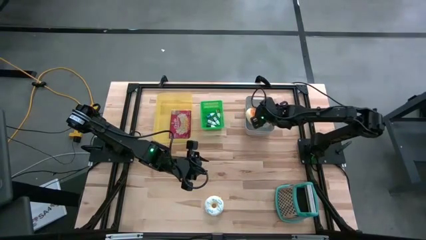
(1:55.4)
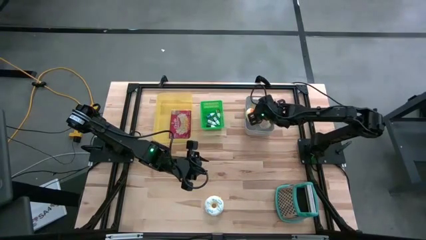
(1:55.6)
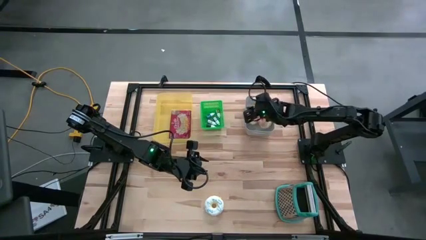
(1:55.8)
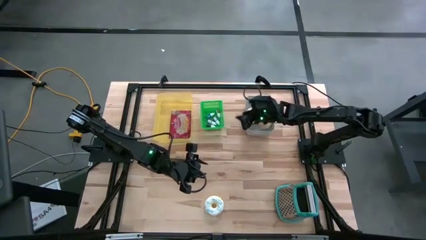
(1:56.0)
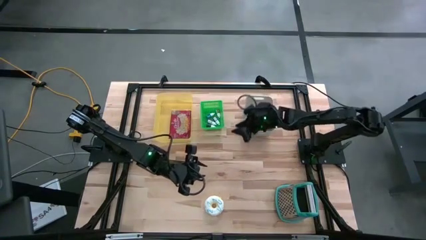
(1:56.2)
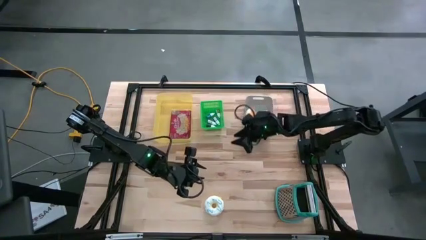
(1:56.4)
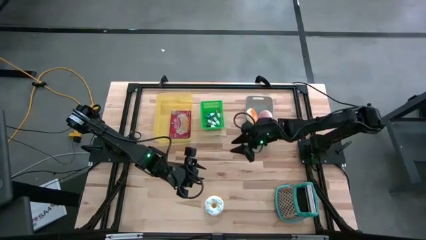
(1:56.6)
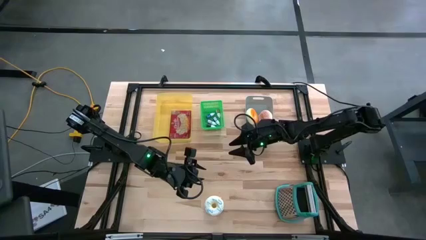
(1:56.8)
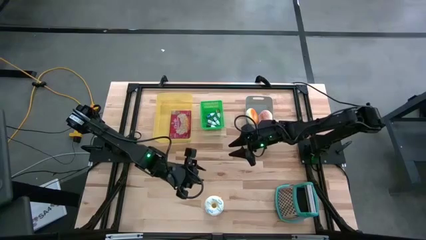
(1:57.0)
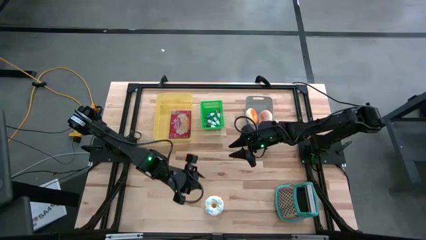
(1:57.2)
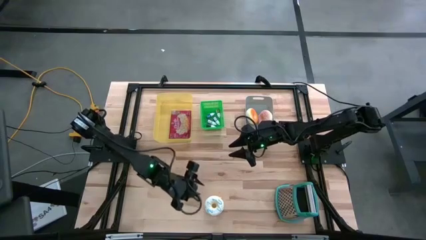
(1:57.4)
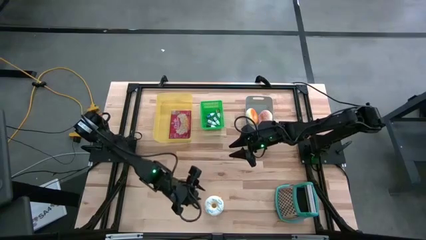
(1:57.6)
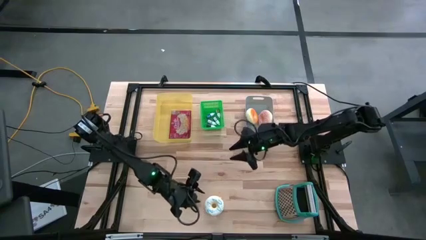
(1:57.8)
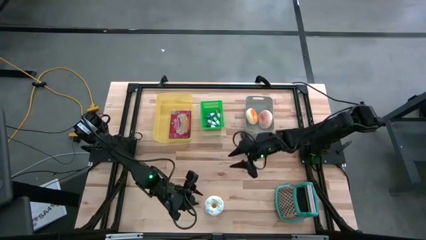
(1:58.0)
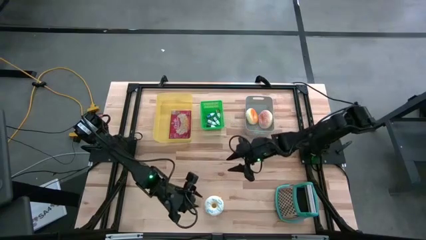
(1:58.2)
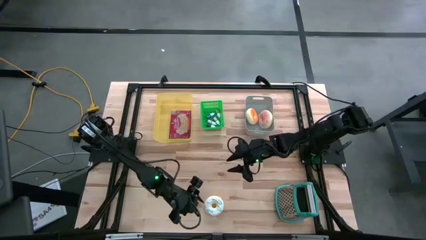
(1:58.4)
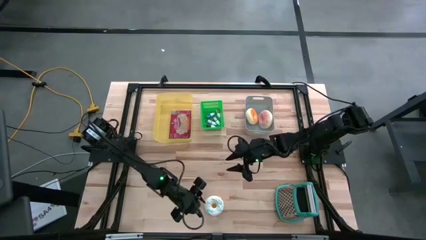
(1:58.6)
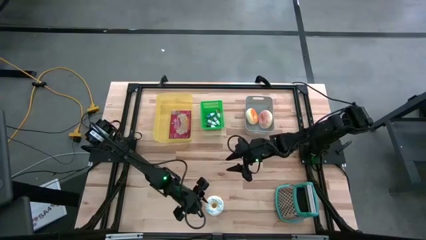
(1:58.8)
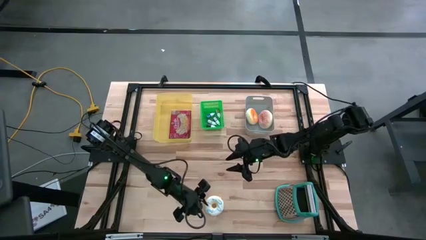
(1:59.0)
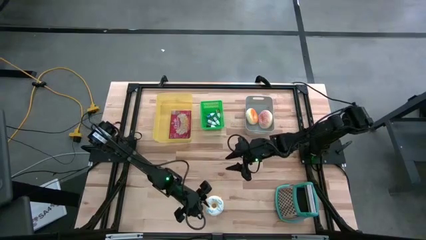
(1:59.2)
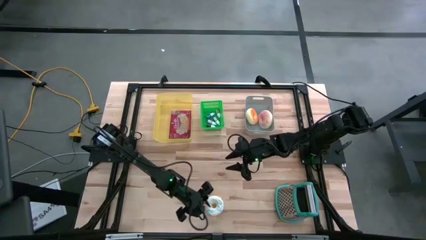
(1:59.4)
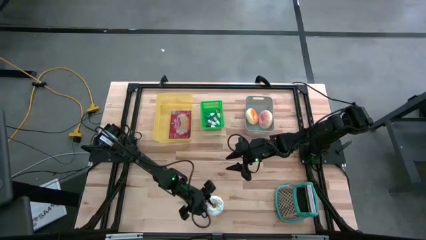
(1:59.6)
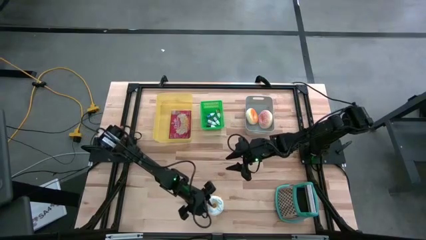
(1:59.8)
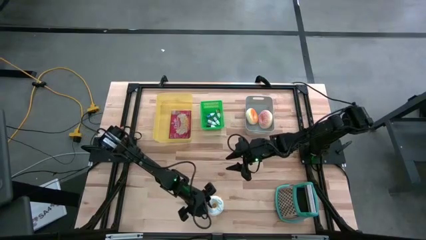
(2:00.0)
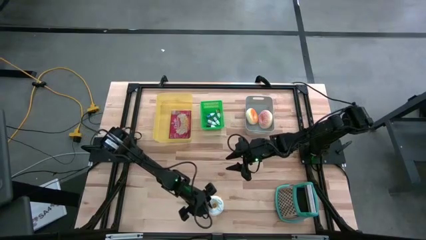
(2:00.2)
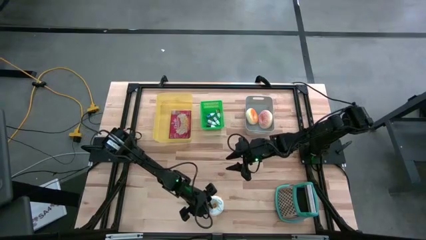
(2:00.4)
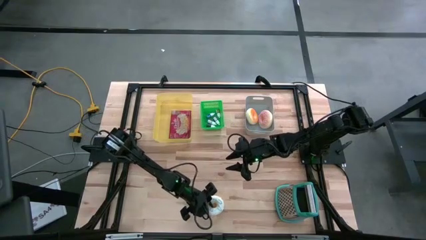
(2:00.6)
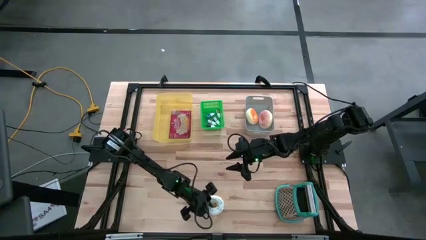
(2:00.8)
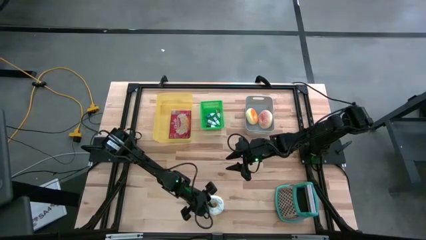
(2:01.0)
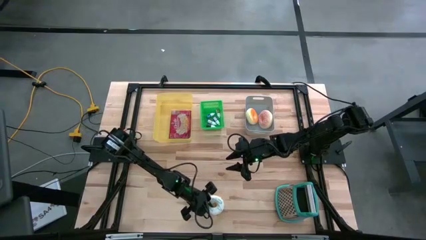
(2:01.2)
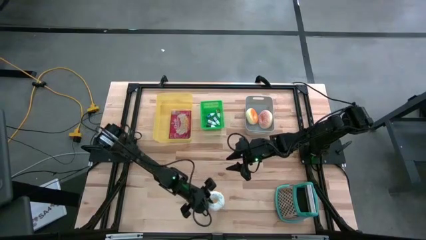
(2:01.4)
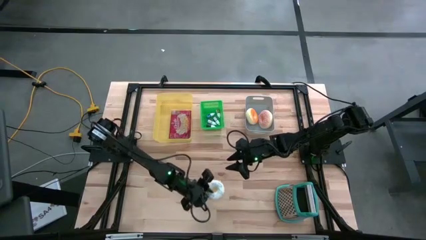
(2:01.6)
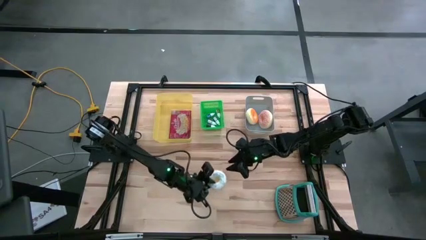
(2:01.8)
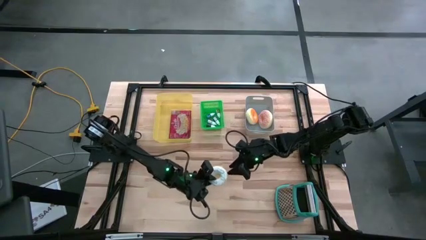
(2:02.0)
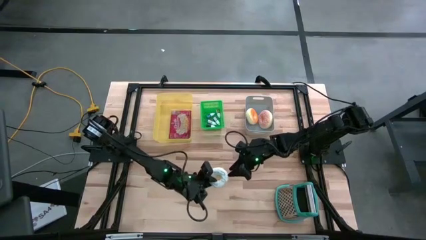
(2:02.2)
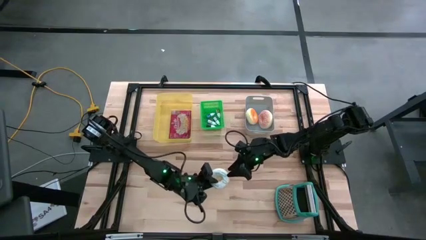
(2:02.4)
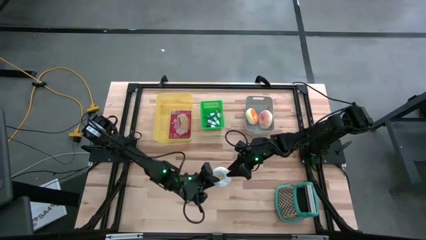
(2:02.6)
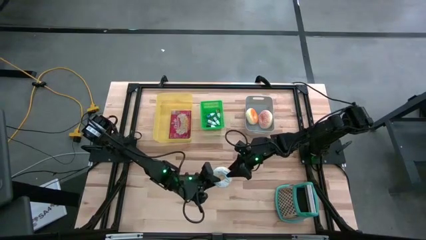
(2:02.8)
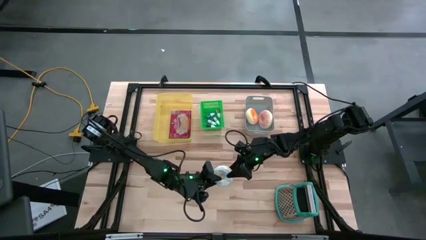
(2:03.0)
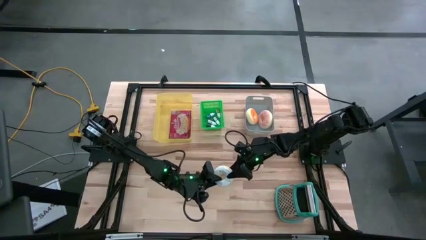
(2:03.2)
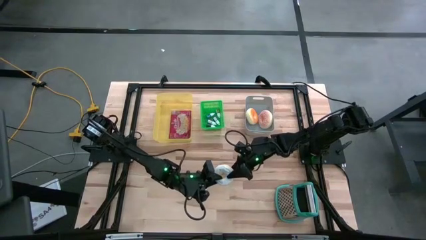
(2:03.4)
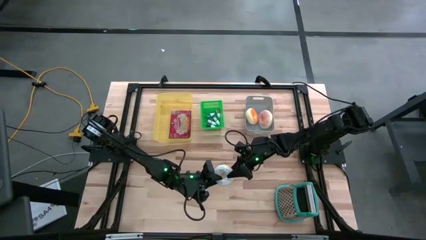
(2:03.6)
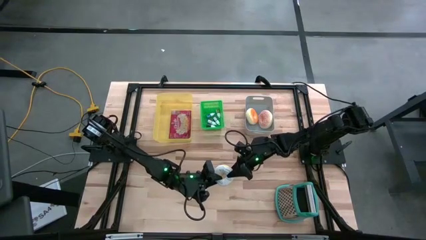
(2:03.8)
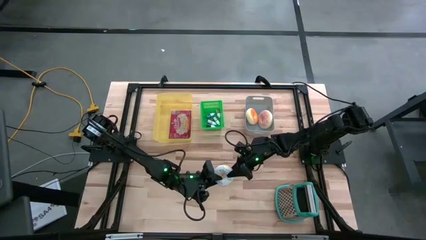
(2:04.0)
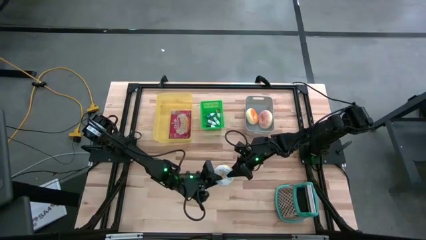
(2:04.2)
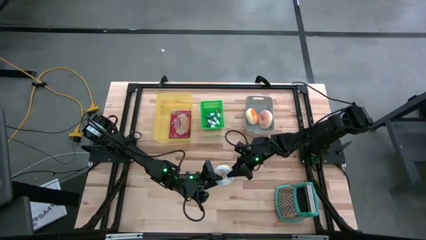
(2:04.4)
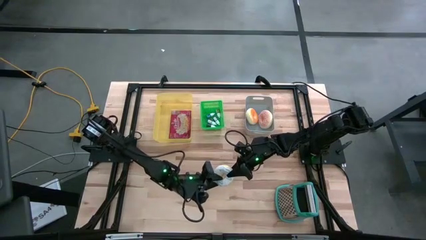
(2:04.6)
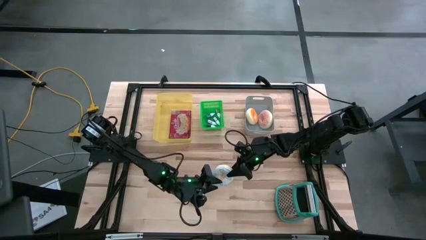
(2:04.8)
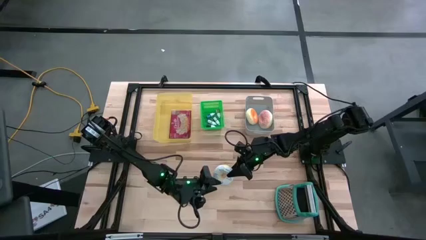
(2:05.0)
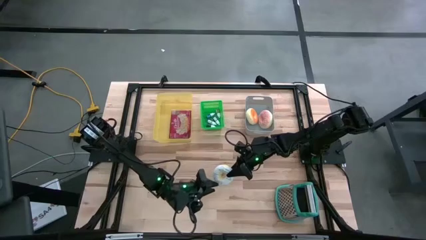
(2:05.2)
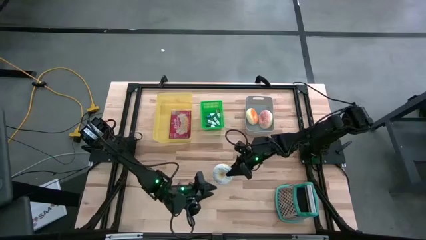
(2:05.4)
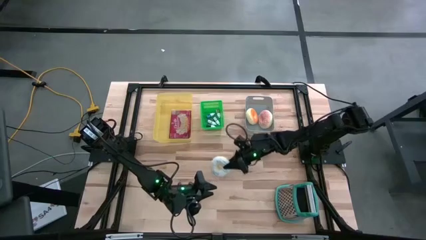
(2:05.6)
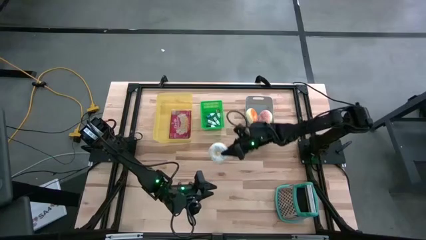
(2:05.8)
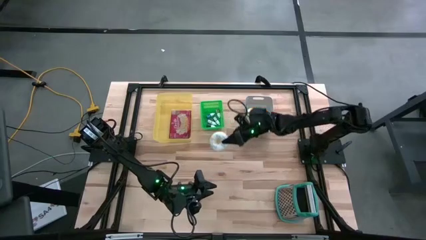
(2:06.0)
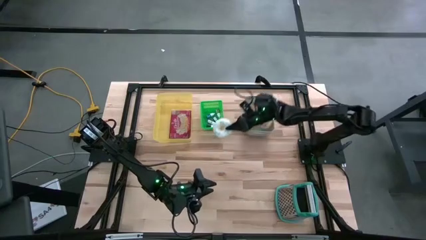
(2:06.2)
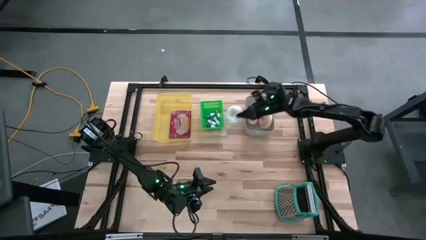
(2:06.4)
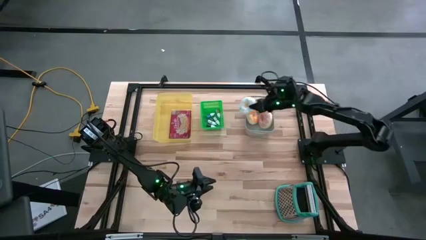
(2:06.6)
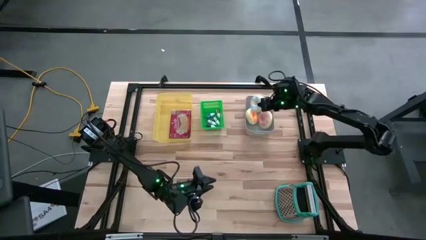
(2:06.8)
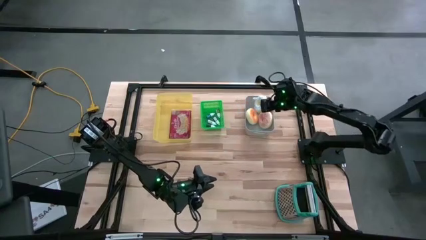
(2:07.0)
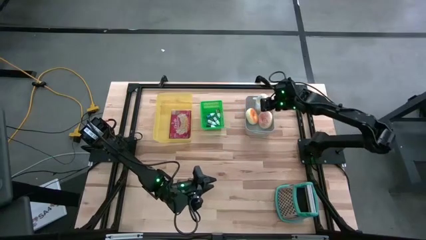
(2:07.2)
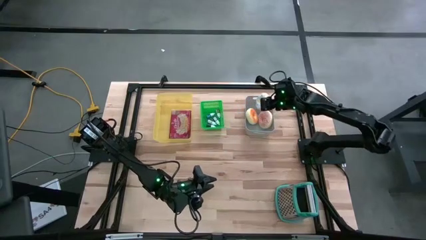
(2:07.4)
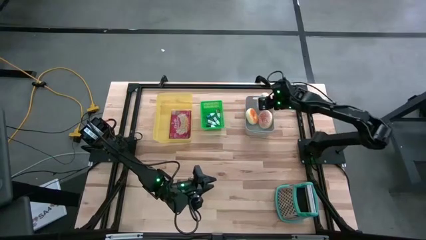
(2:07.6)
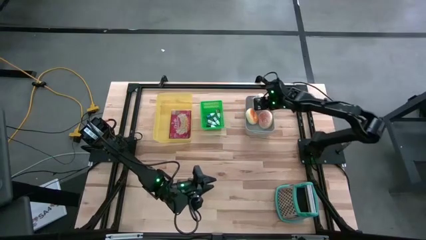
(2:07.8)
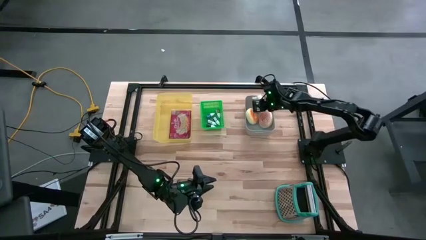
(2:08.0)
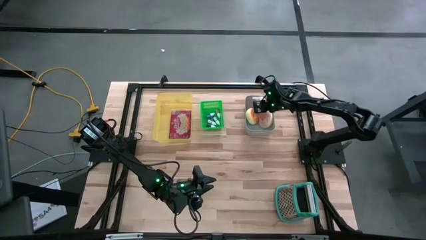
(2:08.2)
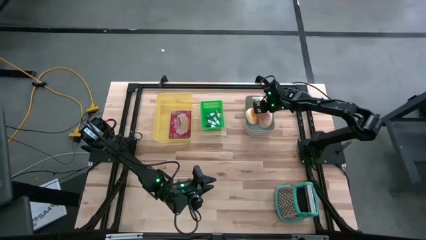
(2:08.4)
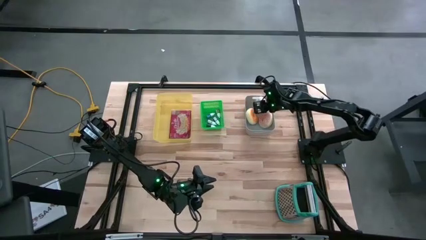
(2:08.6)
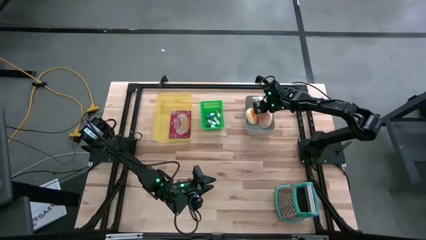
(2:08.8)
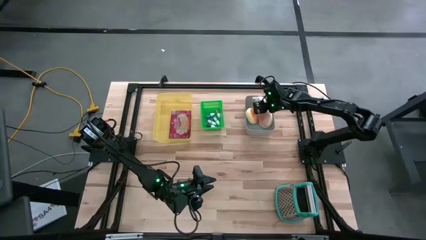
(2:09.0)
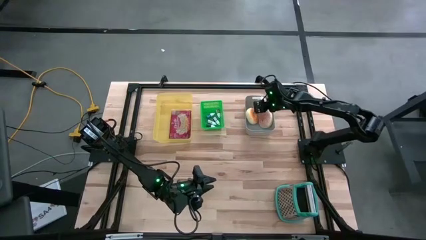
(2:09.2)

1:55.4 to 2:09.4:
Put the white donut into the gray bin
